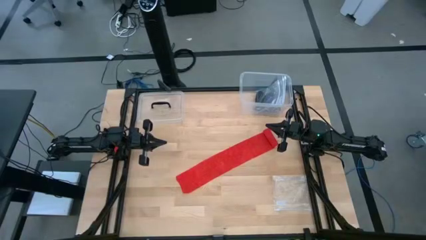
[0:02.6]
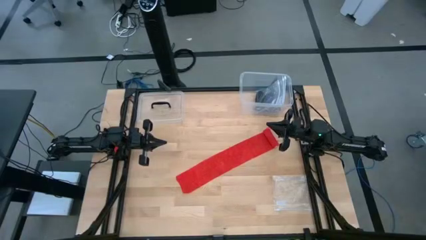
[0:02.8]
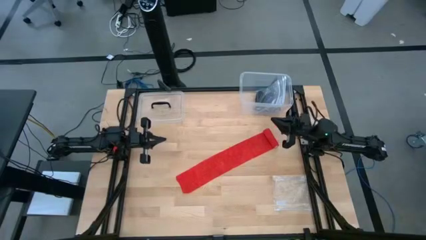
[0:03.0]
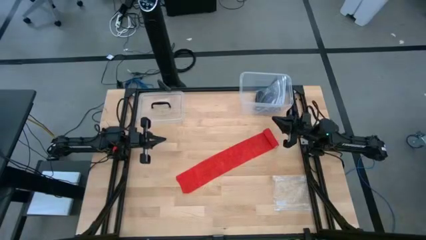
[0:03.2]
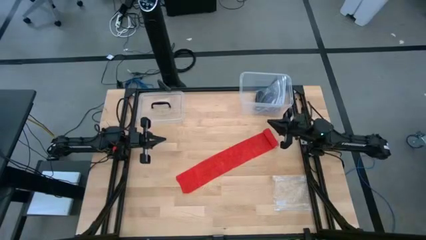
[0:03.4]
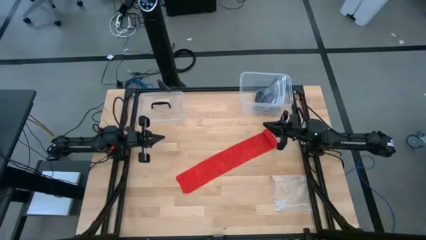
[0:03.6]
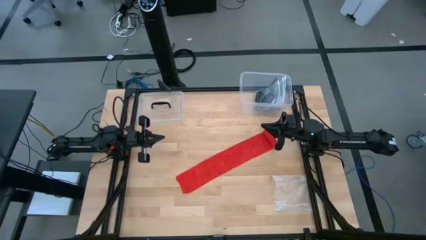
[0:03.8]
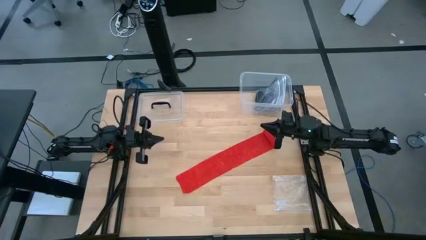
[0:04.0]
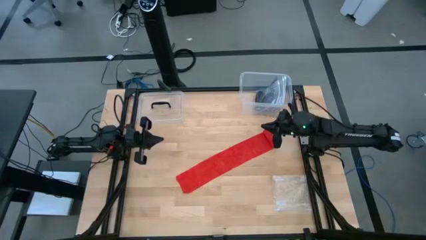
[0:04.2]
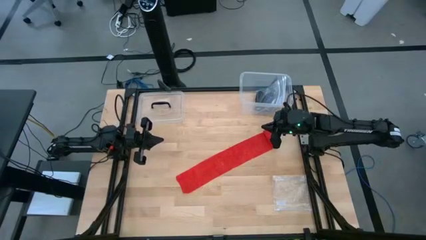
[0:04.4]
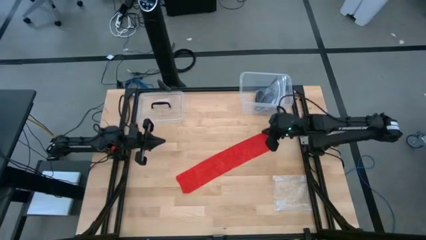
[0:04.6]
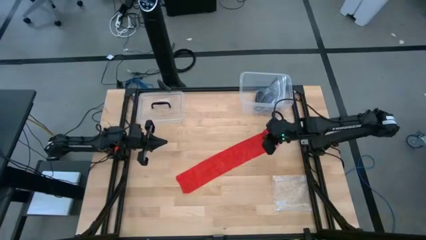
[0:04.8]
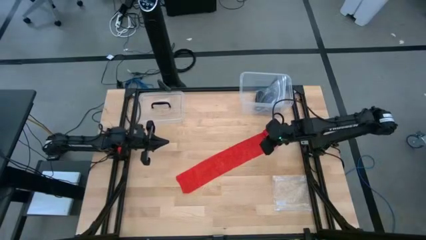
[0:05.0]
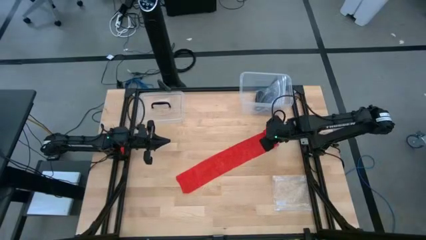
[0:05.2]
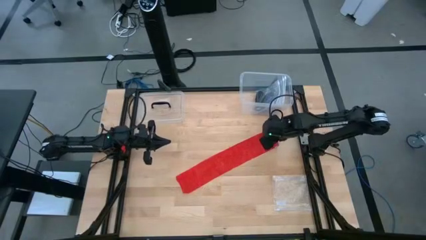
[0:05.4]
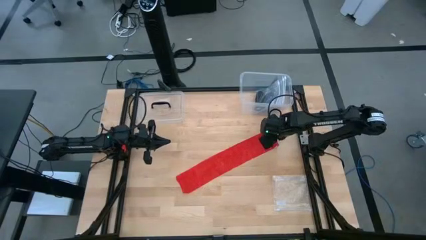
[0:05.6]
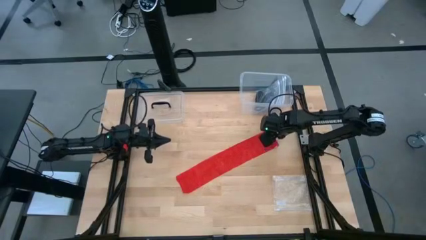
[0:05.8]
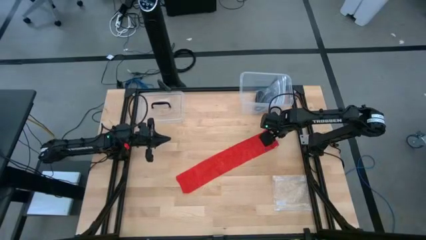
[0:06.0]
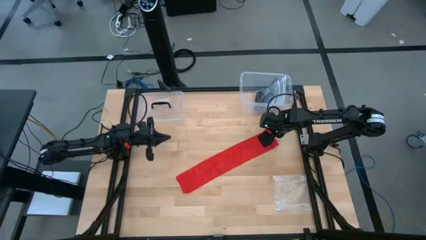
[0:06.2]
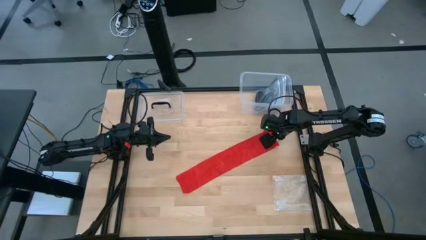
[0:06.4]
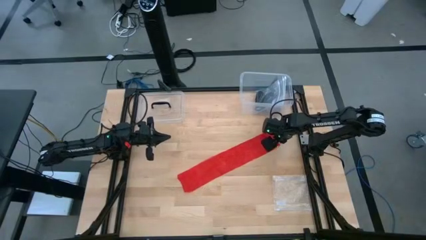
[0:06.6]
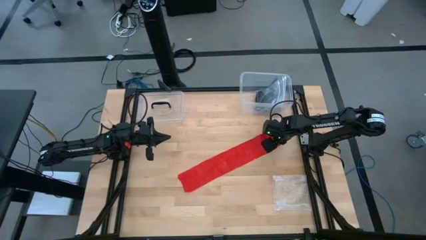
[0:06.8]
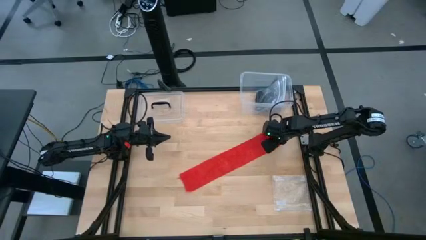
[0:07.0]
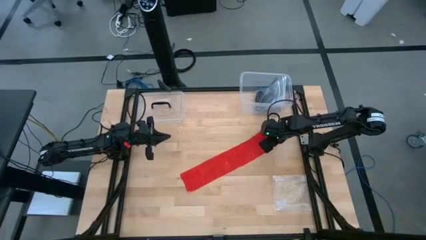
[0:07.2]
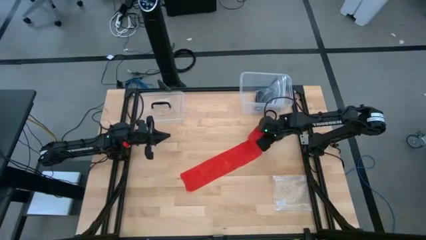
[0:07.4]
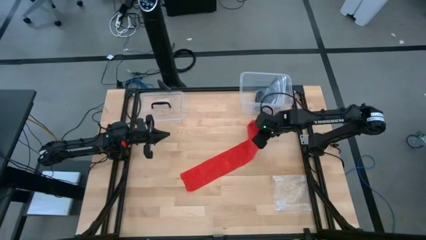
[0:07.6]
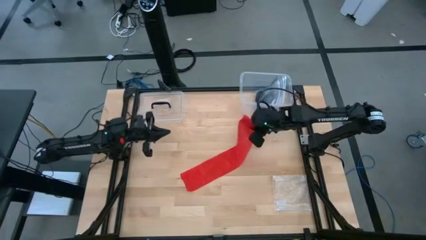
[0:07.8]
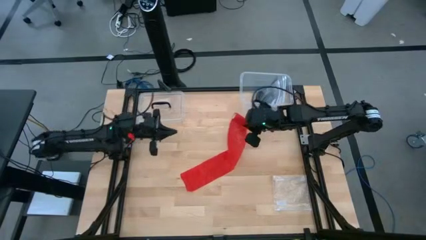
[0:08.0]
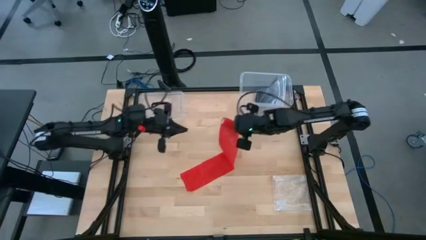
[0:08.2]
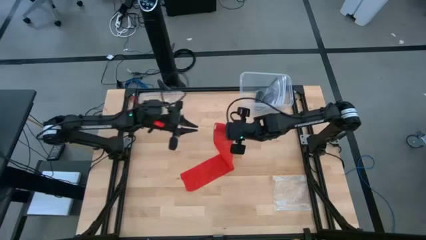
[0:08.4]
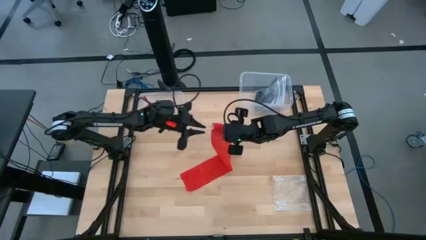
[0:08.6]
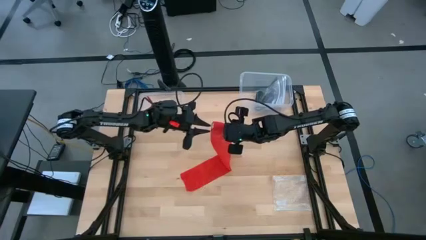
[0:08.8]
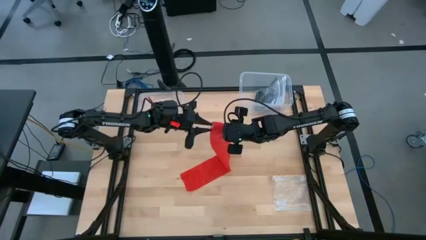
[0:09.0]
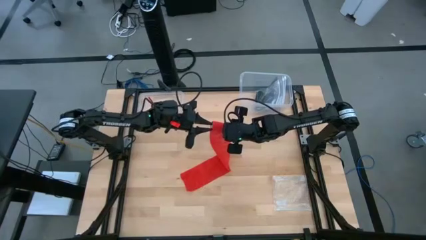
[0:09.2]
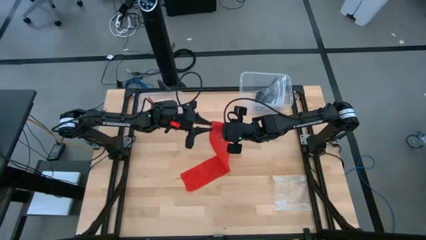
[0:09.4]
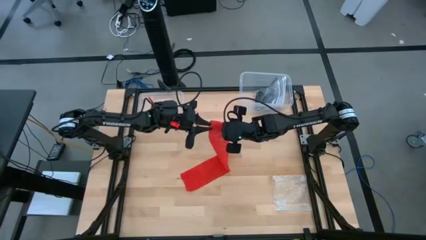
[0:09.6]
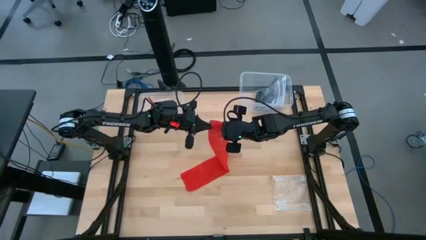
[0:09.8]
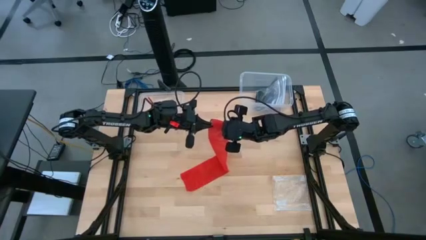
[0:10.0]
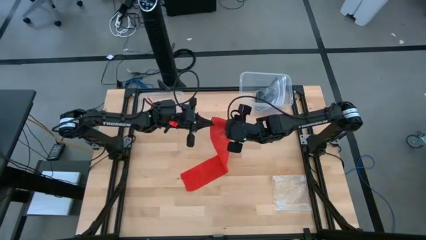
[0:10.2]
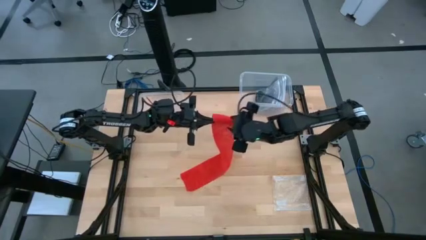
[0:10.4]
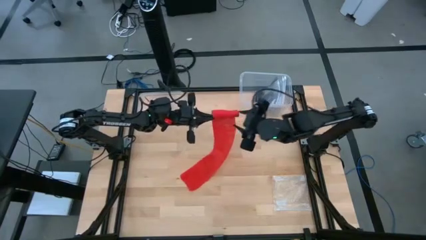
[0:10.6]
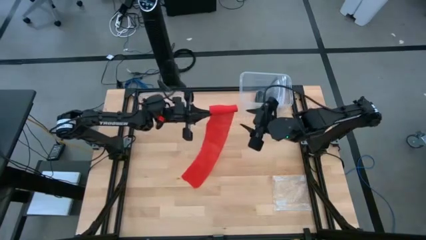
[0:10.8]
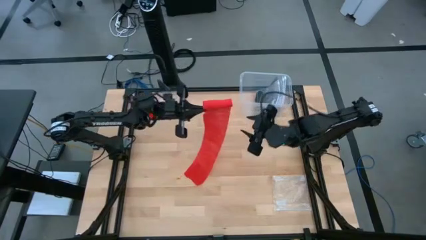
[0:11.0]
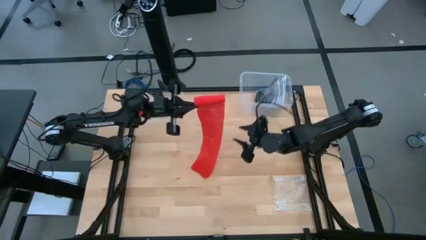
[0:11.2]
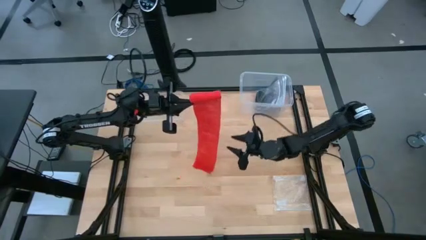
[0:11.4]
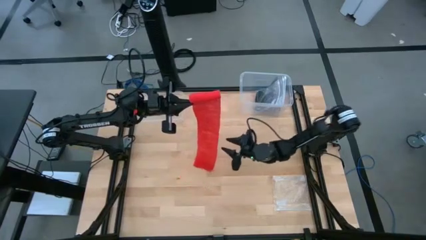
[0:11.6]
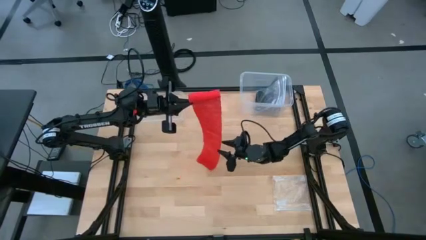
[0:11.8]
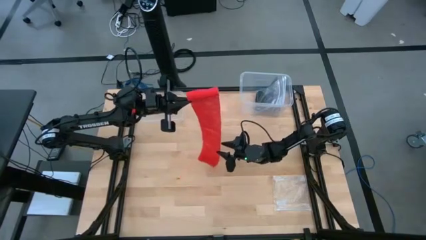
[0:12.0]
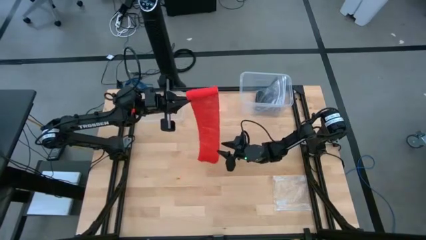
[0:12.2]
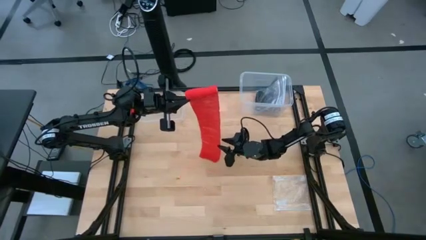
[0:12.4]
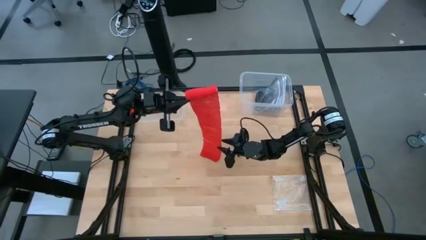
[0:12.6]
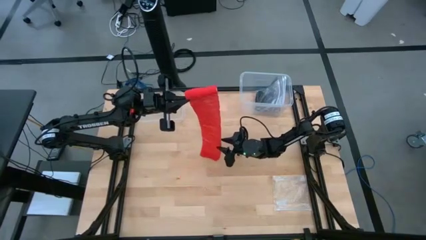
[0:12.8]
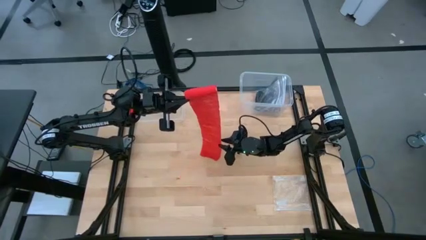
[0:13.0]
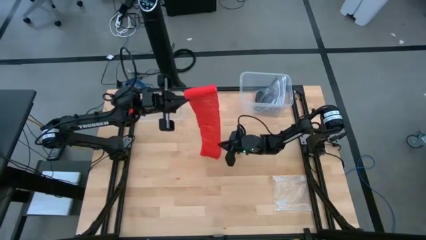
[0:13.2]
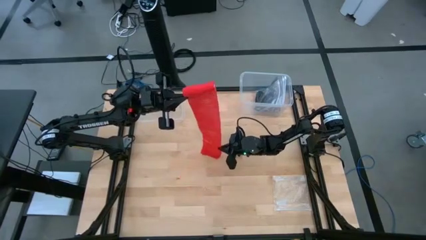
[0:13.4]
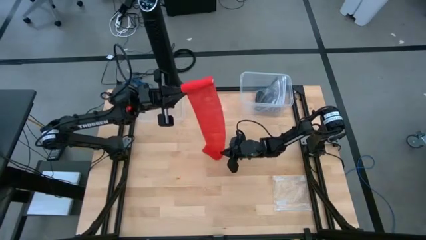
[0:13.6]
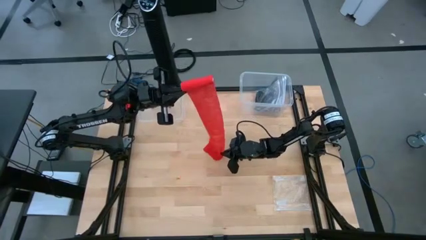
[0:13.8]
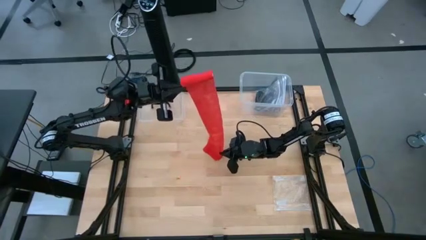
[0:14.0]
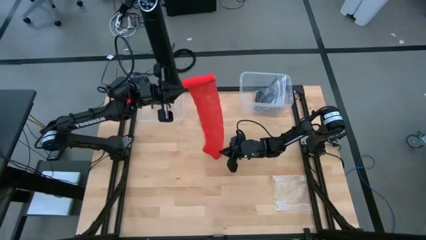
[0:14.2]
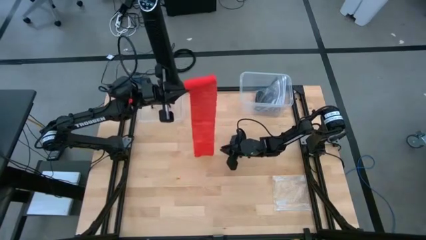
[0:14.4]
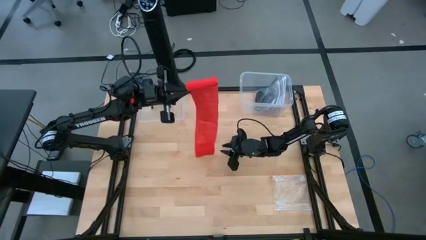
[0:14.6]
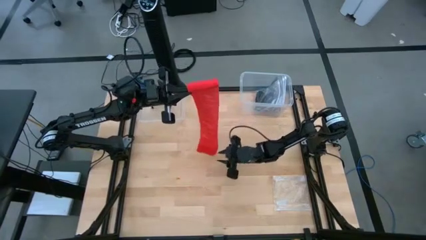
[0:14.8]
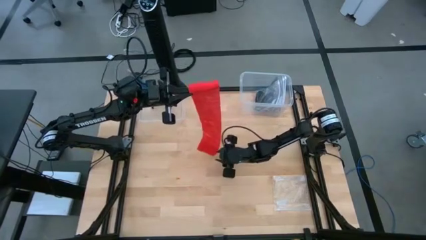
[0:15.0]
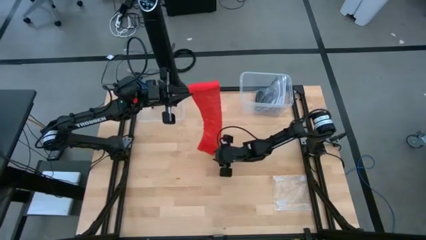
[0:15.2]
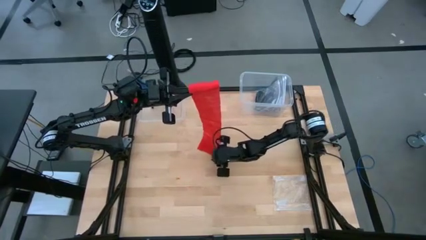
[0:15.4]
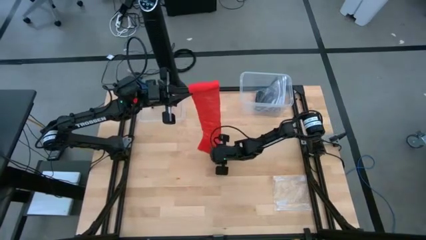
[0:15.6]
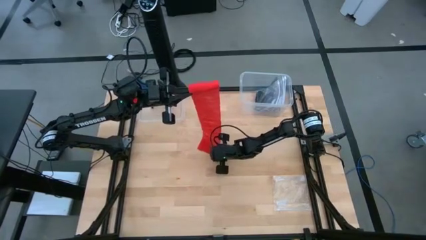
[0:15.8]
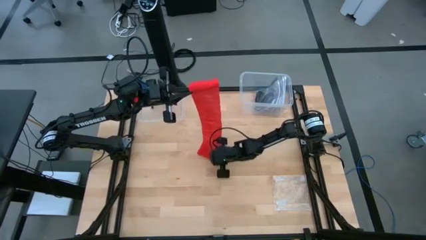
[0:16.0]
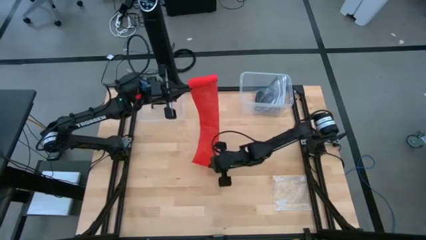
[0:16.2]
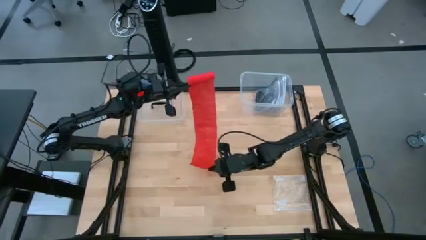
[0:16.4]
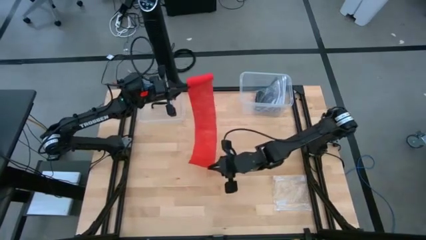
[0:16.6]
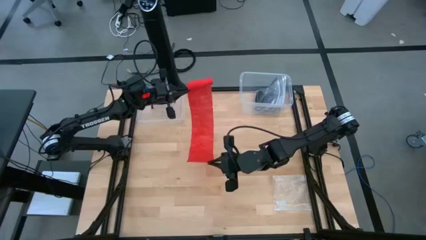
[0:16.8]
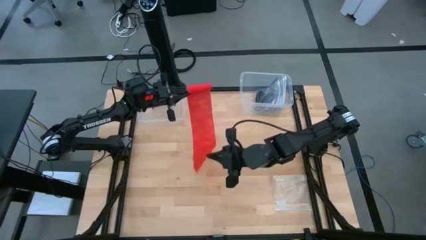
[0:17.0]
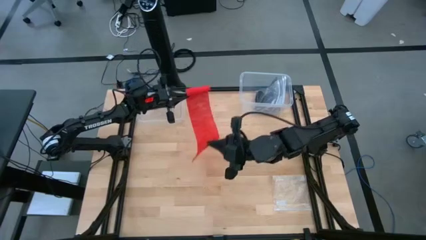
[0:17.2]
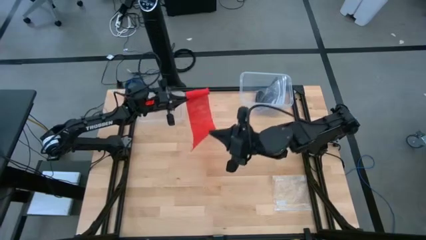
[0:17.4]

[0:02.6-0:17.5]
Task: Roll bandage
Roll the red bandage
